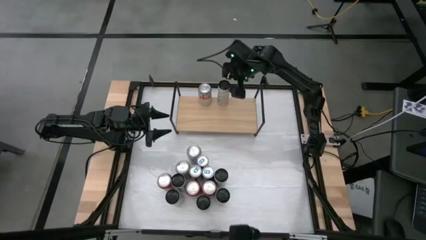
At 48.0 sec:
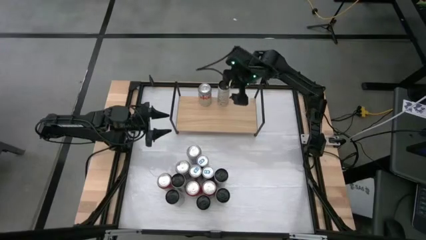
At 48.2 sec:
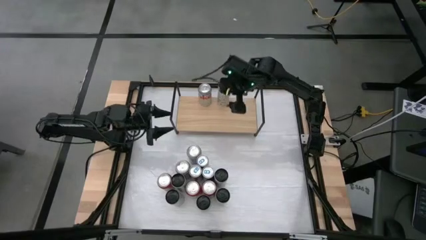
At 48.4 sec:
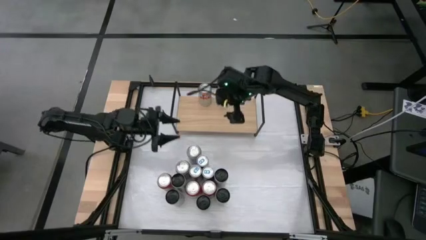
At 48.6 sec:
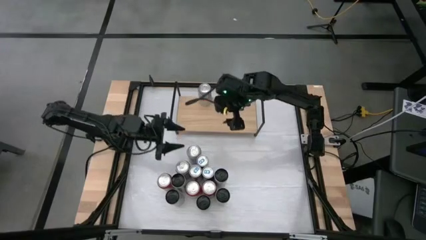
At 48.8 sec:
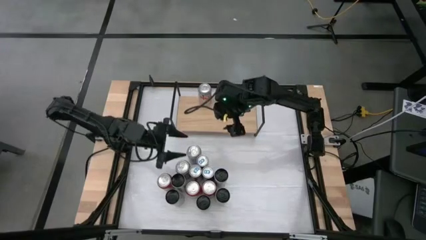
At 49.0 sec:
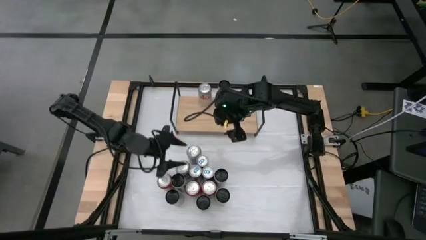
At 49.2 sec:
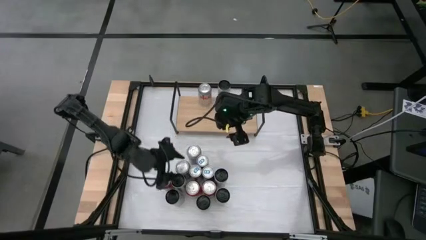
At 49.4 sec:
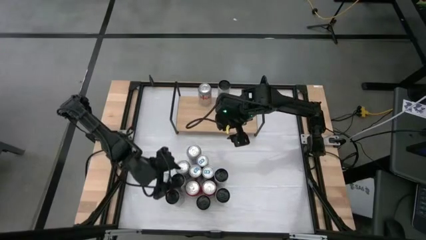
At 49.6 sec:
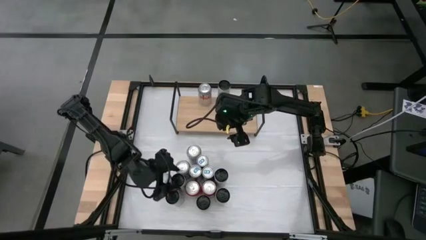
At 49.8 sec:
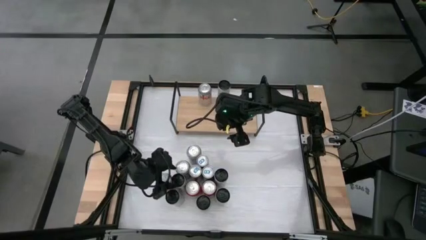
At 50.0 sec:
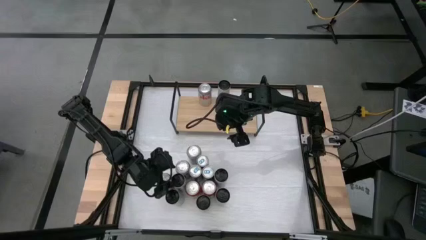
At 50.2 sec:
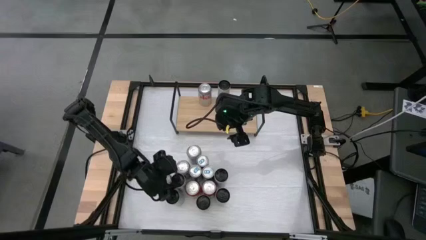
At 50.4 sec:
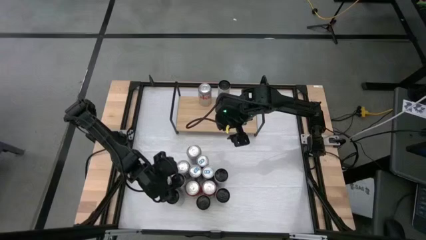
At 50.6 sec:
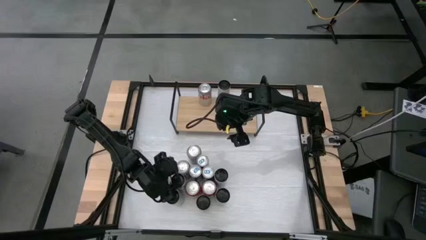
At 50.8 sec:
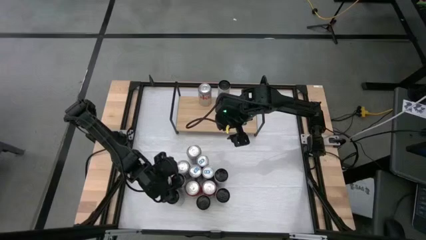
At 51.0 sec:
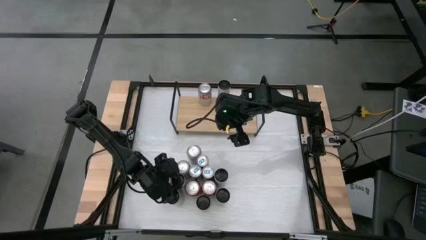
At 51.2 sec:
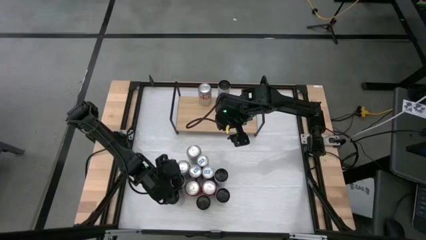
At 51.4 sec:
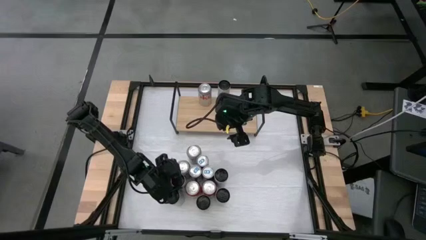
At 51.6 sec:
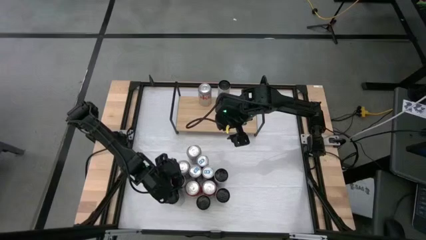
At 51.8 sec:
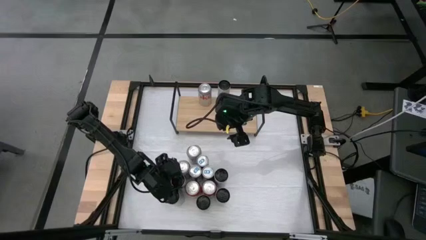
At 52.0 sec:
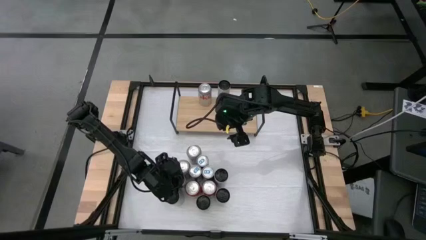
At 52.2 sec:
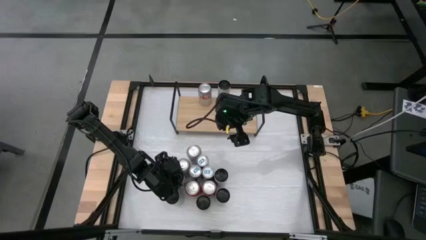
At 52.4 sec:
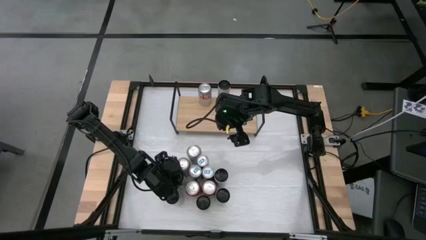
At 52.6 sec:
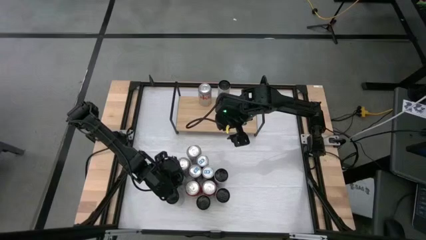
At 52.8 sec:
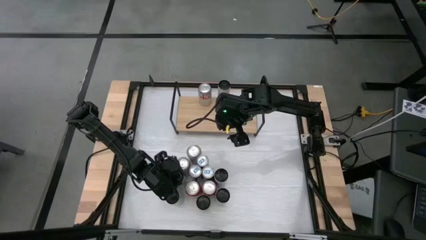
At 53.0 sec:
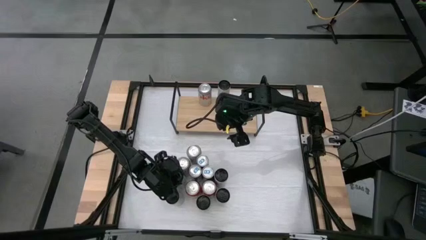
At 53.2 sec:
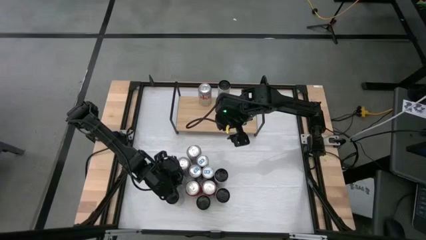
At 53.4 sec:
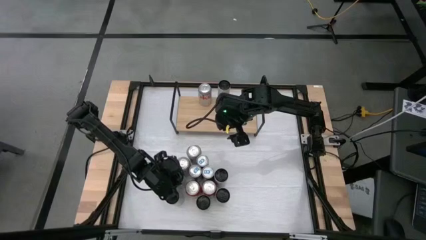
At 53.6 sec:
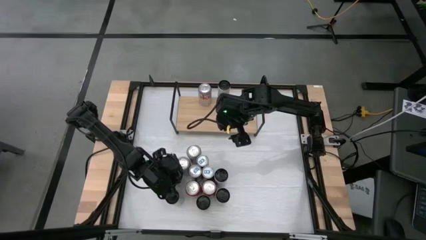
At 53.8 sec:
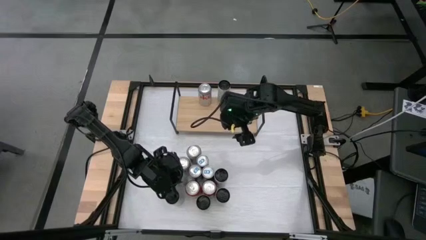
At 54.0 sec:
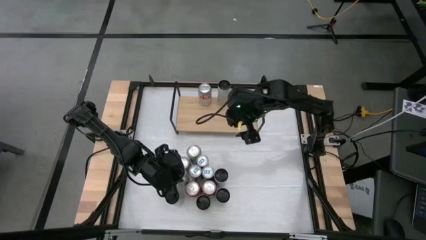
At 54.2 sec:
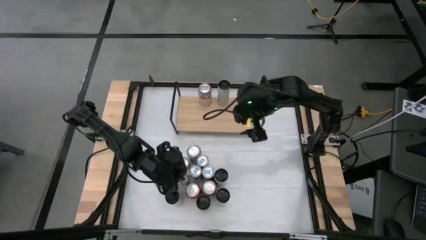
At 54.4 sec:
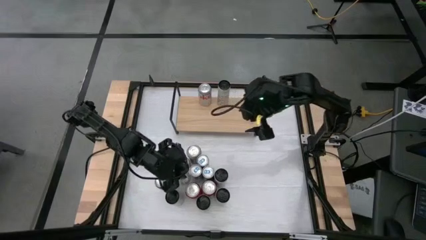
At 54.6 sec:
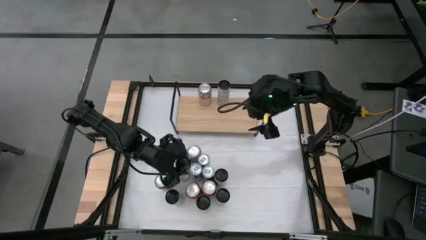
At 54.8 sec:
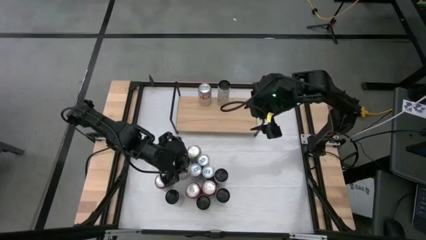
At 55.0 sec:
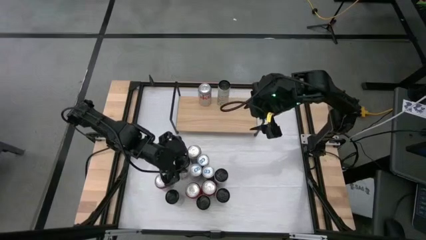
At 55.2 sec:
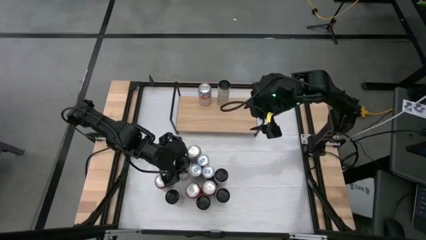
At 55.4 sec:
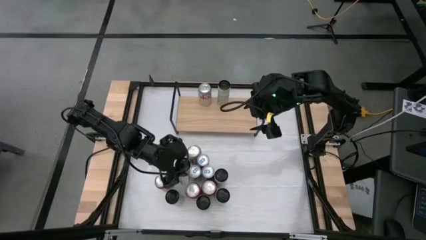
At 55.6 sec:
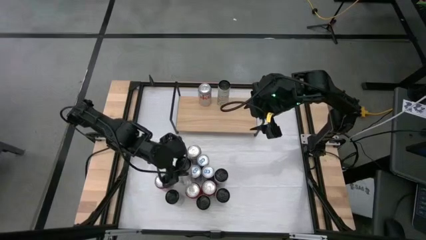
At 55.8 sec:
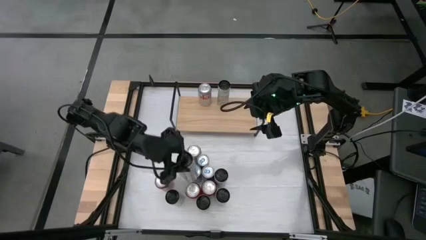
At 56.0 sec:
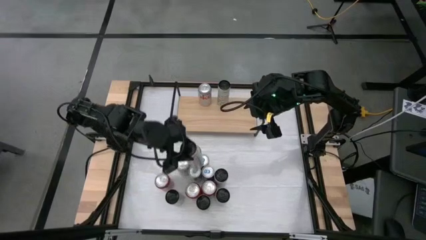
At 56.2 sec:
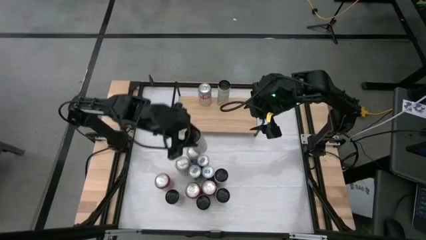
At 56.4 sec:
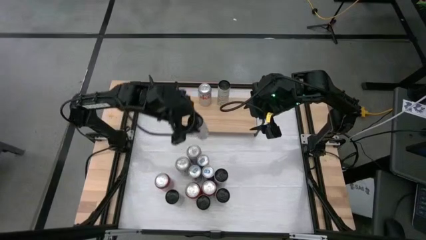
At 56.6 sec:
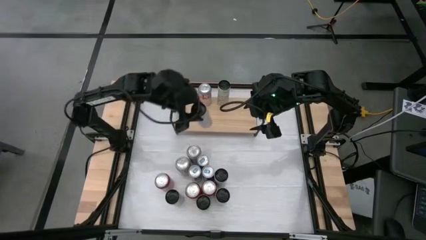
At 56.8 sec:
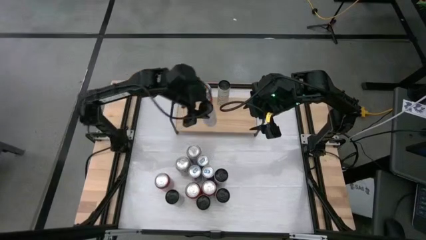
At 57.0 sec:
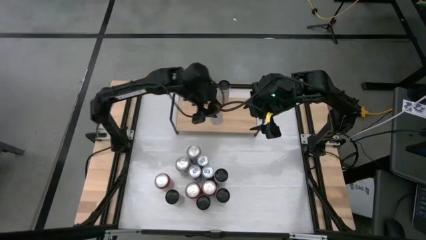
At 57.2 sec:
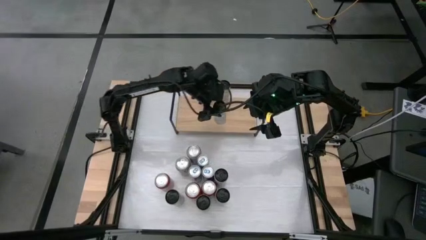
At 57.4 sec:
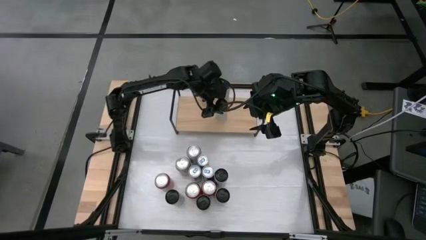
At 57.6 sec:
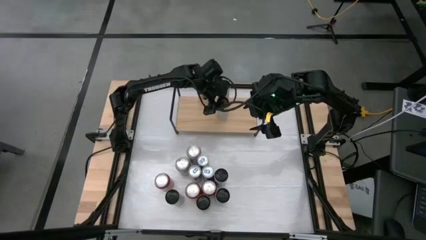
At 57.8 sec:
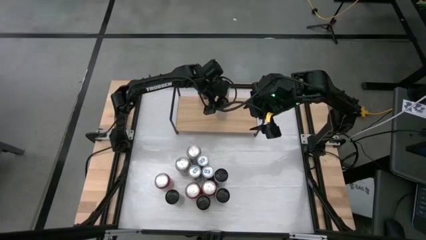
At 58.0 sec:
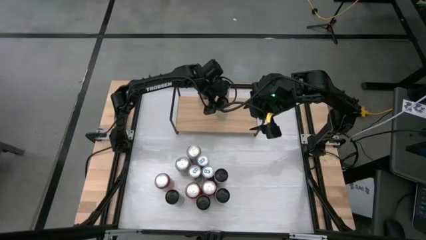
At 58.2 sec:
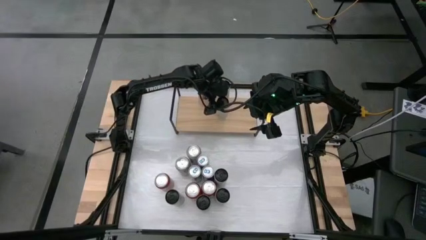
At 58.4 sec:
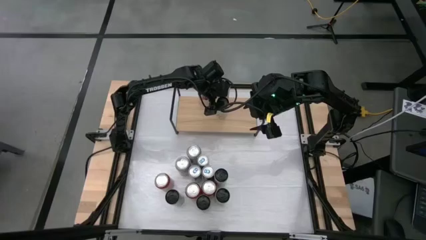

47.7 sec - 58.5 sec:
Task: Place canned beverage on shelf
Put the white yellow soda can onto the shelf aligned with the other white yellow soda can

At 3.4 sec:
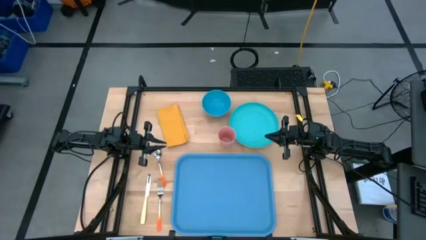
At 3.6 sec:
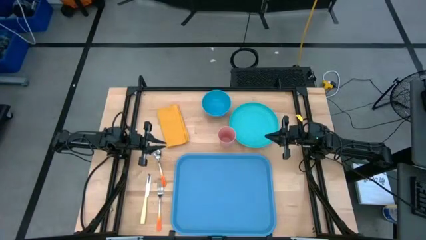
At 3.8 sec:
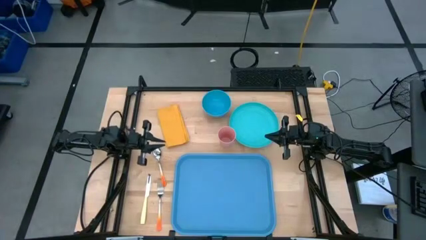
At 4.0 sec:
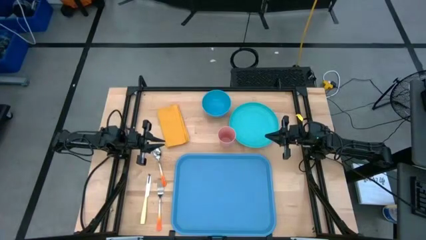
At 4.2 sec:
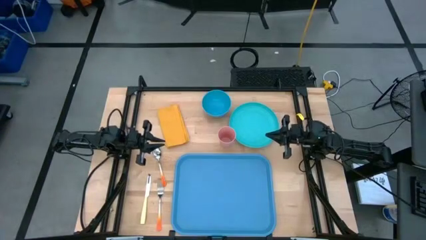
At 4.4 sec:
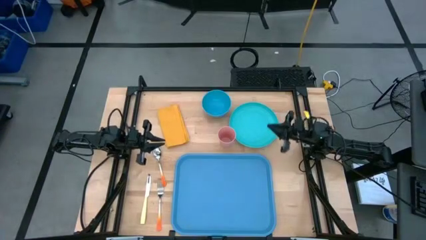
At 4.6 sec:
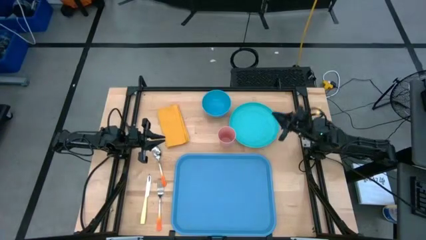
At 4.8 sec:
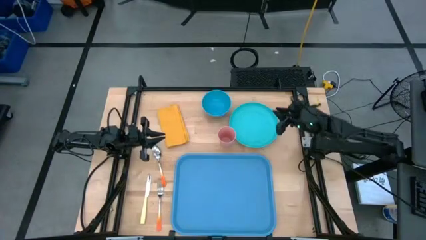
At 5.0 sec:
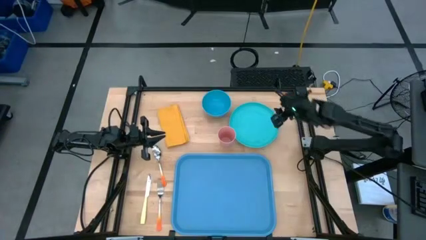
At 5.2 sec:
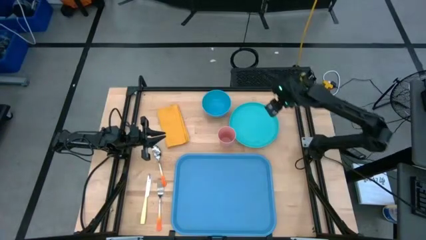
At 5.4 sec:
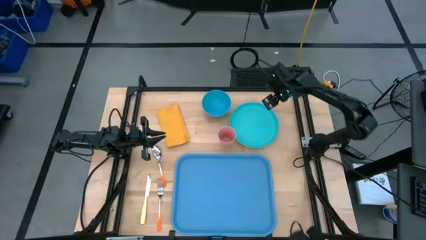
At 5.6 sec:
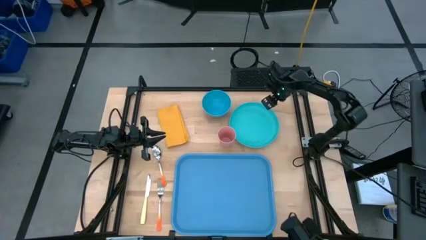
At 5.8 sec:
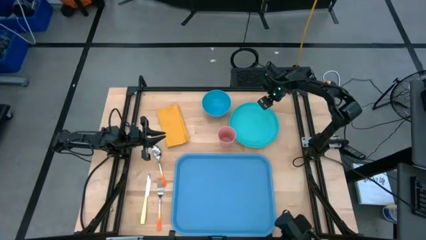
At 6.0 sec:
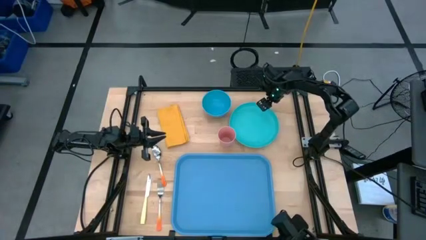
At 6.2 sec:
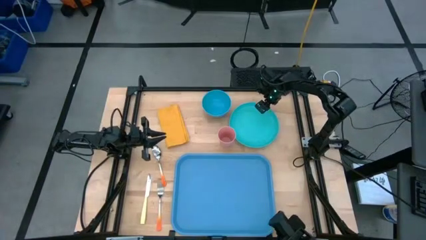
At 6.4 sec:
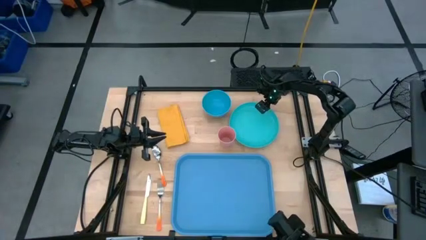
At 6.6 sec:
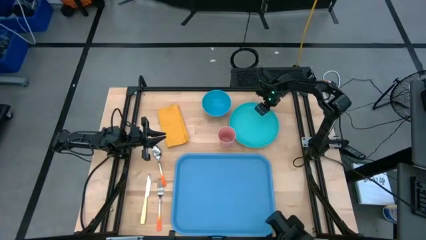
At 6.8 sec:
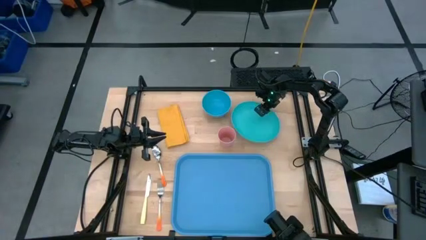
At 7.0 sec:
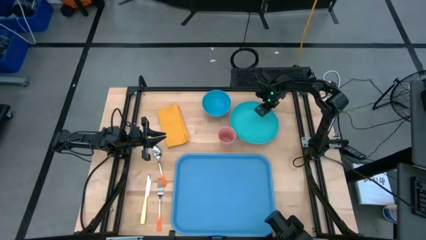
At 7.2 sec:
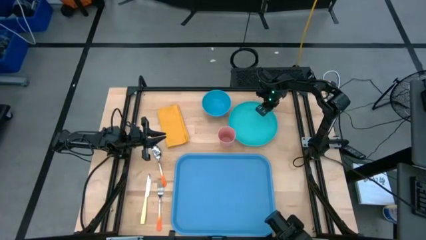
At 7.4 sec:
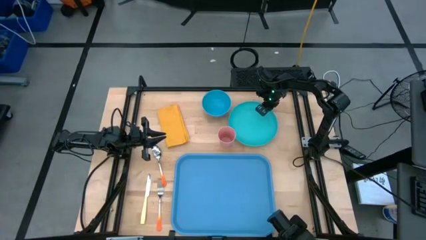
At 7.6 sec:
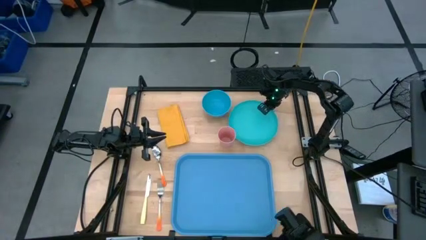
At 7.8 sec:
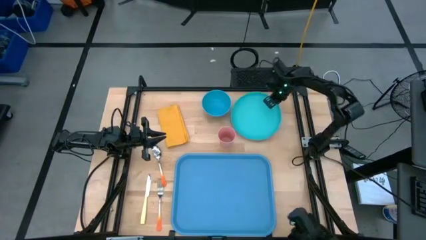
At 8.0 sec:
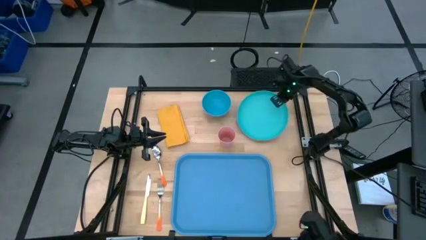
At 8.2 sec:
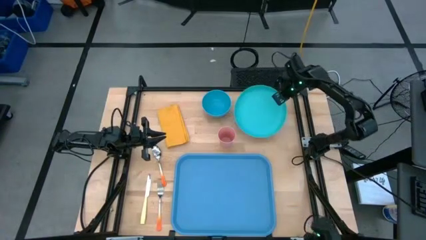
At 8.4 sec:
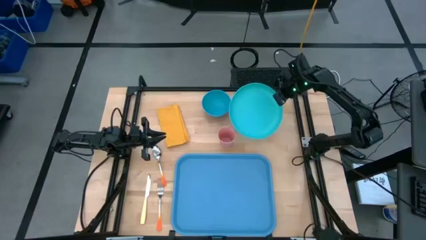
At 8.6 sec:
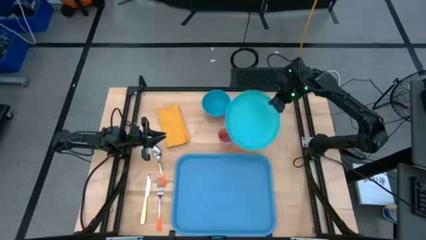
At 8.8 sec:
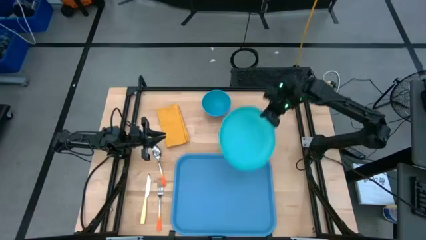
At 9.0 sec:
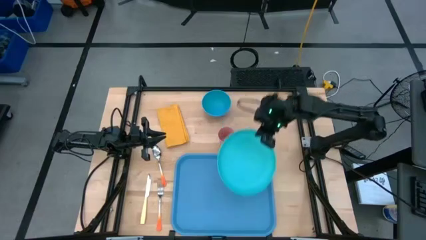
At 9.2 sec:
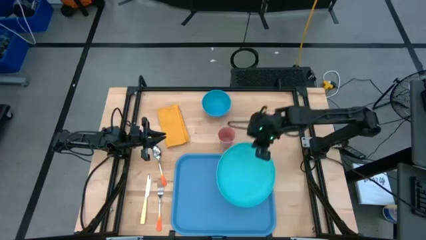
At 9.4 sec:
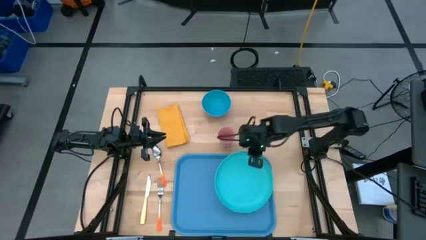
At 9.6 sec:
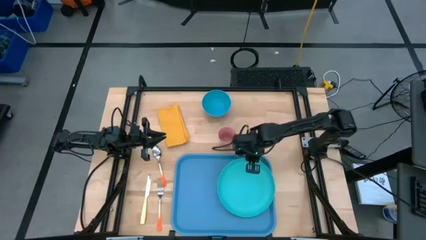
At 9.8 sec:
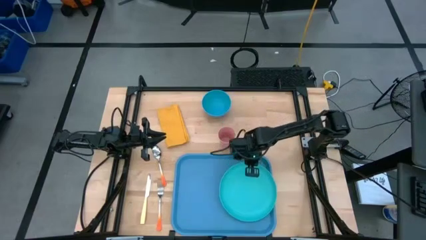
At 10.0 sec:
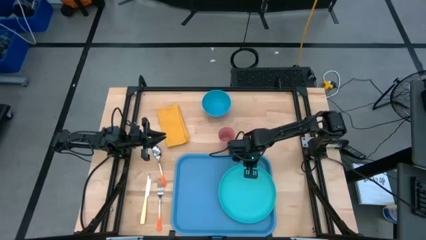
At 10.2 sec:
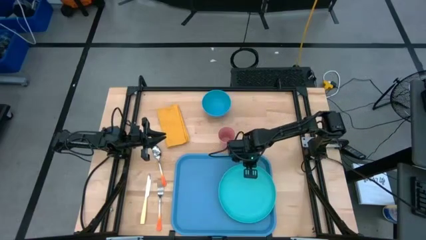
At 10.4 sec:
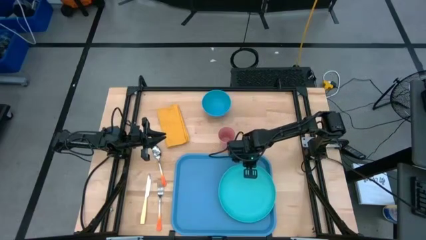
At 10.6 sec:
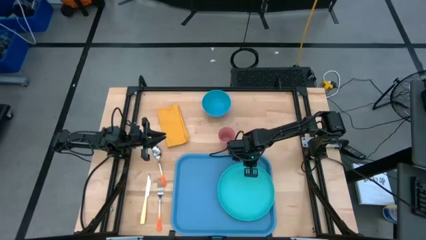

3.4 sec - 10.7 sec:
Task: Set up tray
Put the blue plate on the right of the blue serving tray
